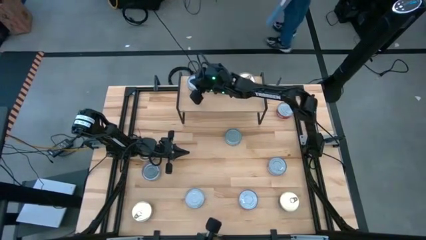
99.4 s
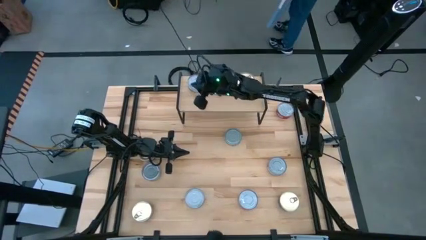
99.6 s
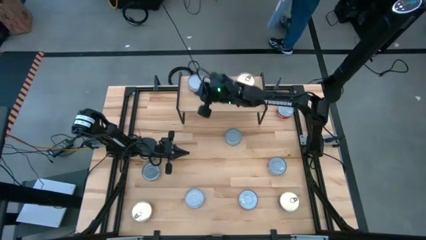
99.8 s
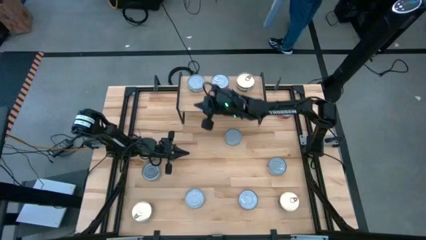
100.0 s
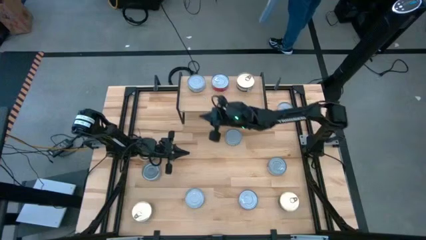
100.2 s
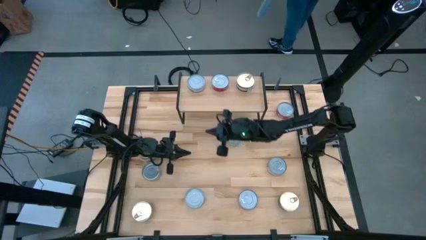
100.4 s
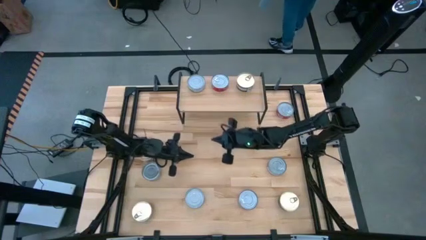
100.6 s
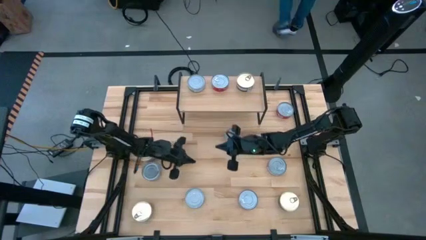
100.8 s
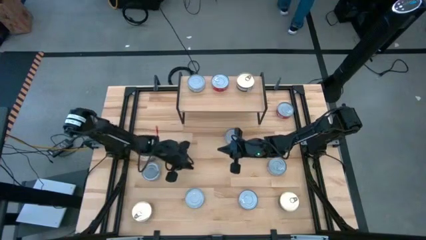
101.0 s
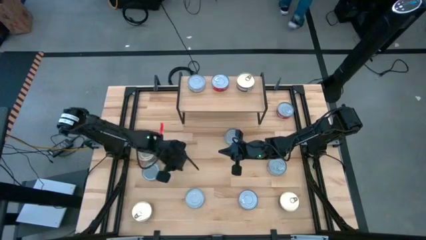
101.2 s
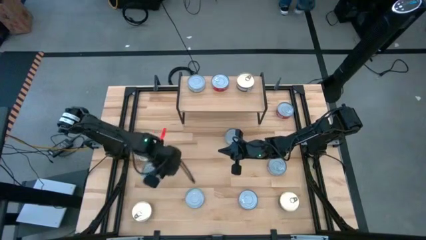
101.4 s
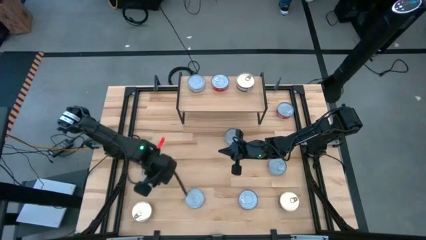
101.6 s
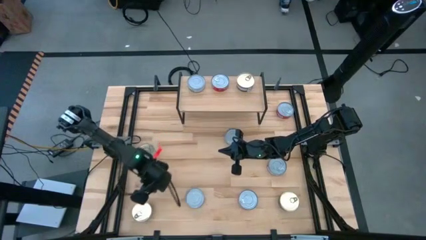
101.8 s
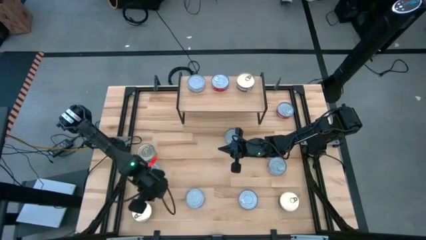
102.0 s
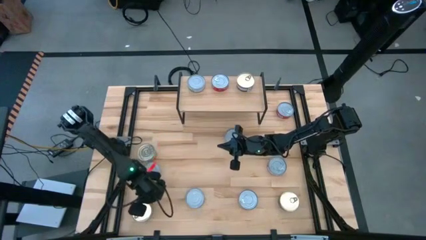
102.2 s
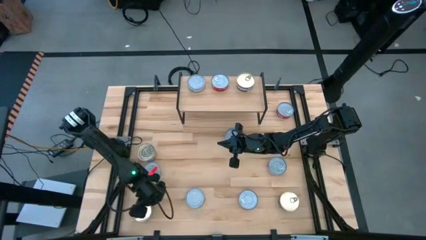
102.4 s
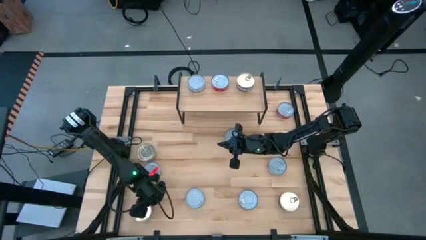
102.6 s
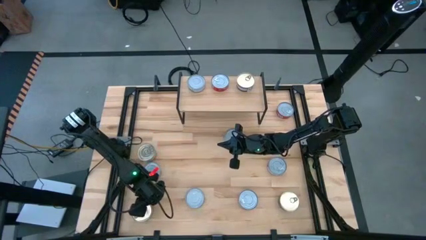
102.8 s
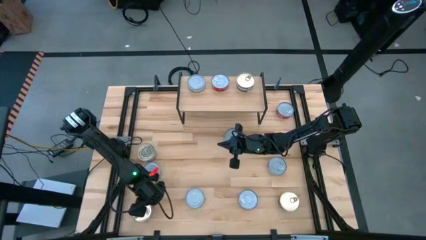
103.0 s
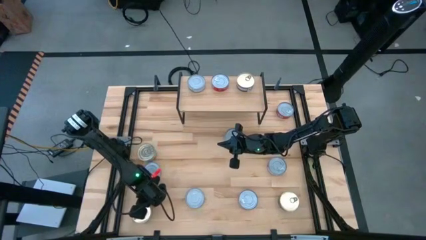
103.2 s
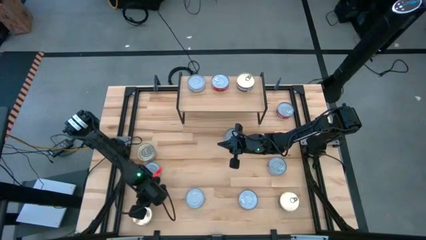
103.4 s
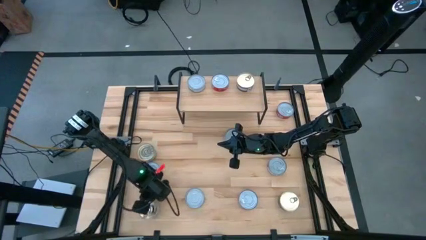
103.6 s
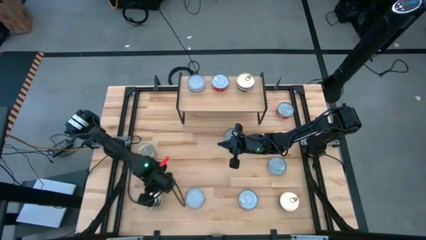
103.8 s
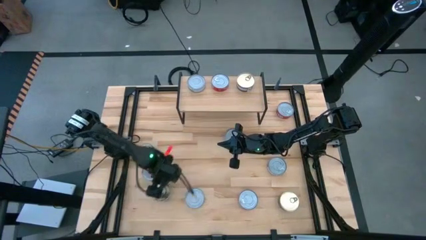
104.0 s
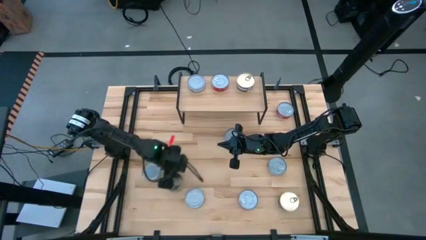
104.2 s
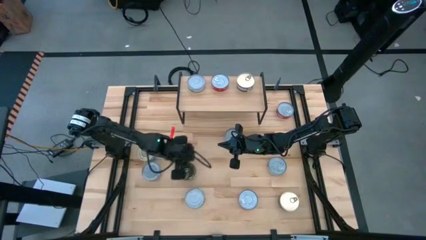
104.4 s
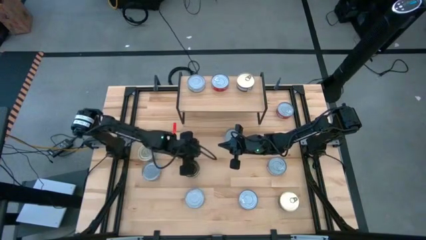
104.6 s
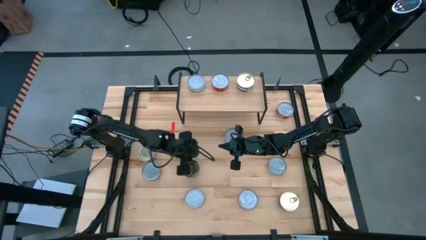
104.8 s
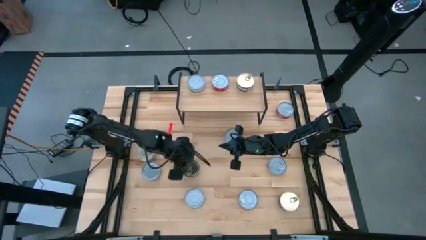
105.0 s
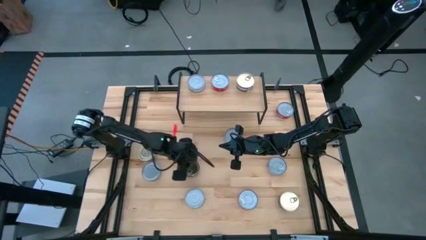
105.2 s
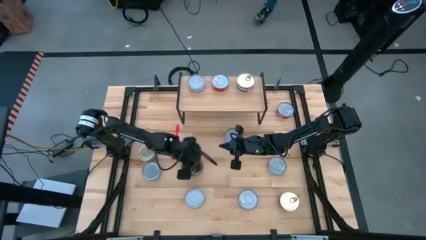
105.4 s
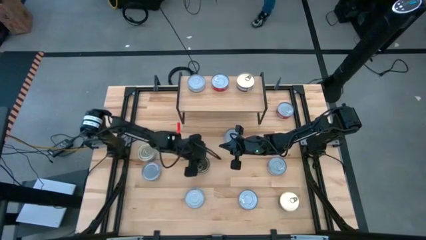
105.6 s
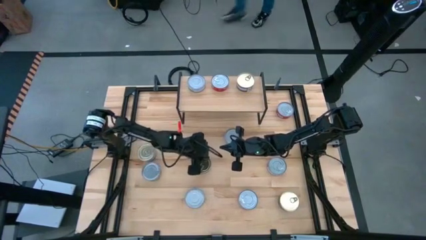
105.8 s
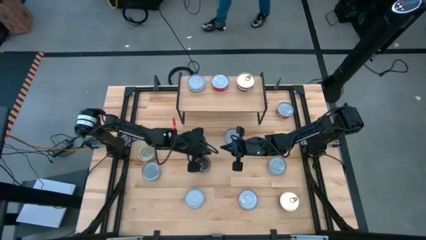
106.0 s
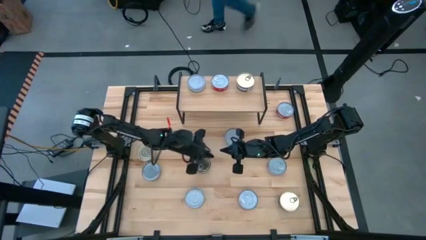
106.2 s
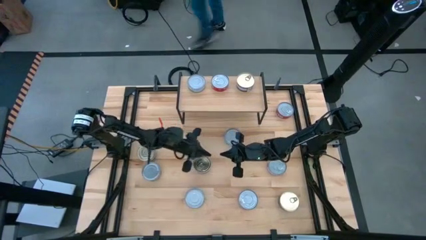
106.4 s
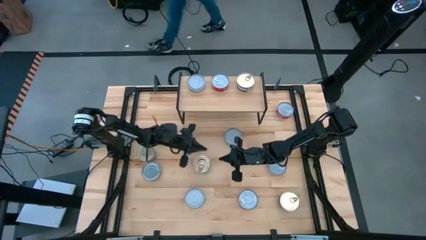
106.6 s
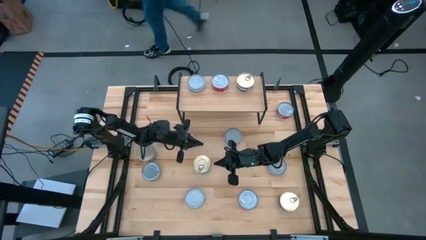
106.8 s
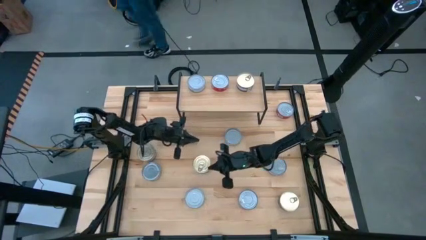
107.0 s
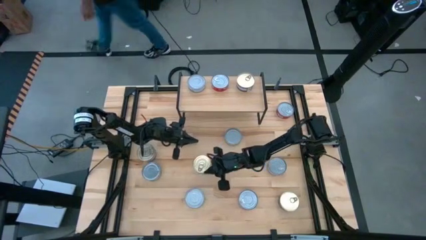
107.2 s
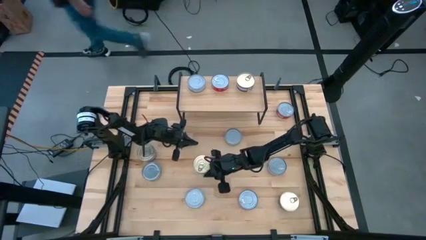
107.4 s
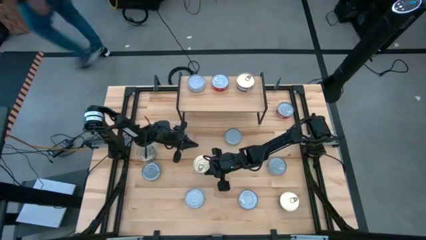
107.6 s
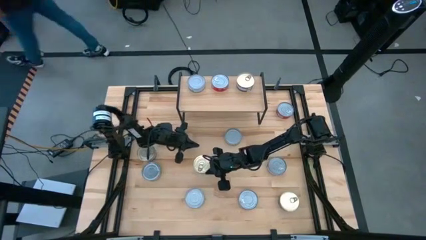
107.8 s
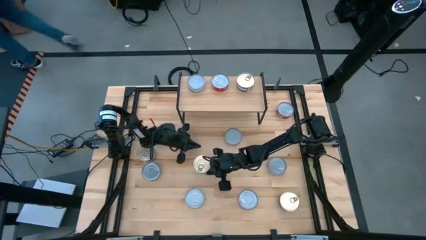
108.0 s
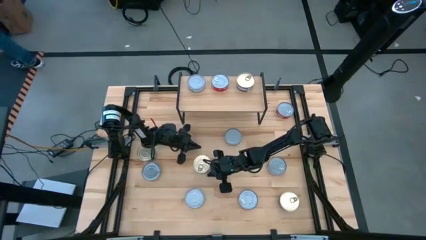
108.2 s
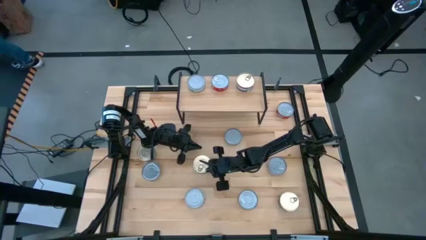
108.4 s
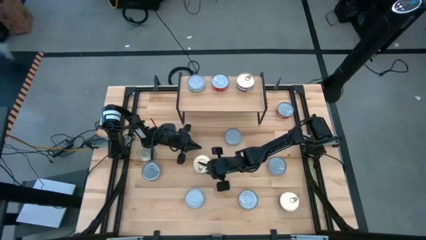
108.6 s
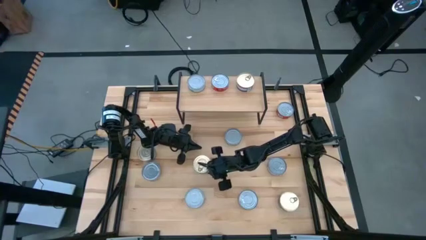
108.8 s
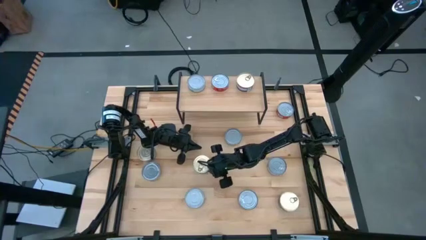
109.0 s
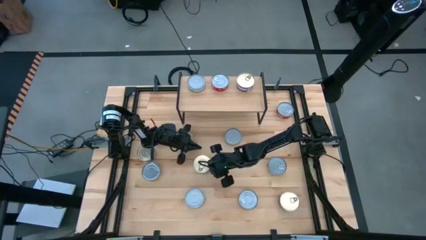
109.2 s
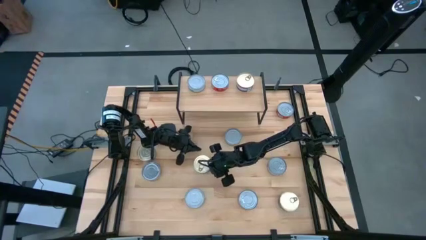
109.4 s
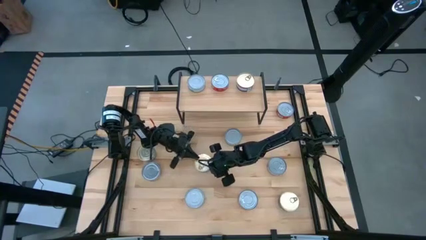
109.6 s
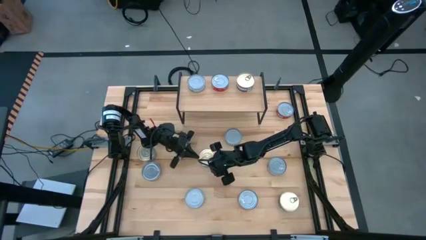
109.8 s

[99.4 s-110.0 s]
Task: Stack canned seafood by type on shelf
Stack the blue and pink tuna can on top of the blue and pink tuna can on the shelf

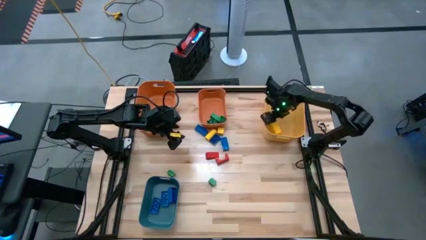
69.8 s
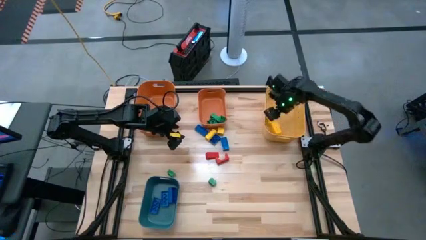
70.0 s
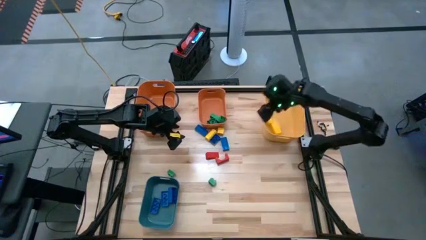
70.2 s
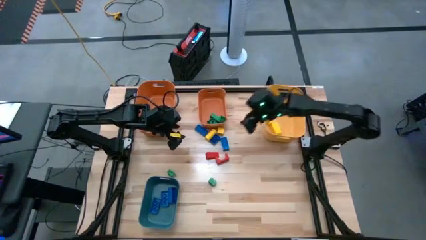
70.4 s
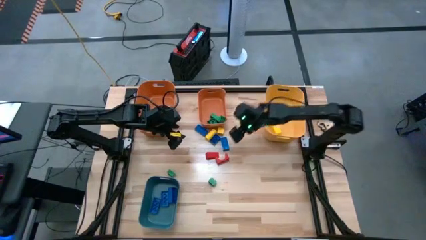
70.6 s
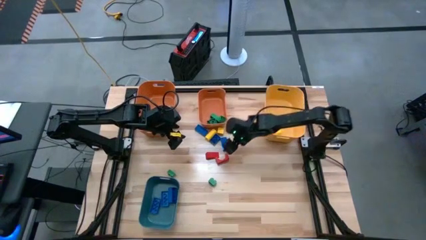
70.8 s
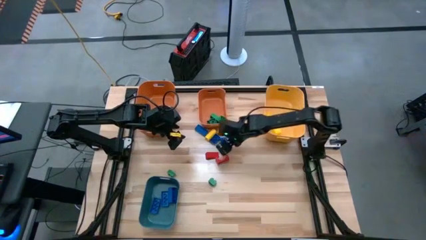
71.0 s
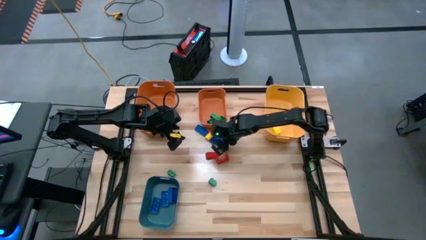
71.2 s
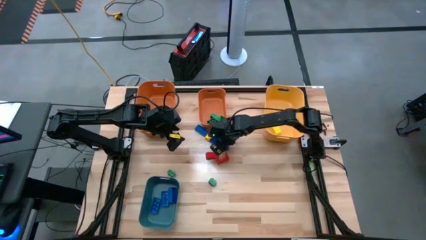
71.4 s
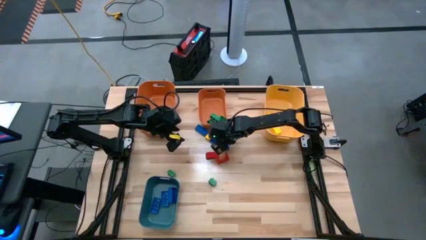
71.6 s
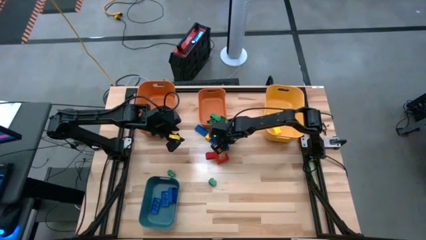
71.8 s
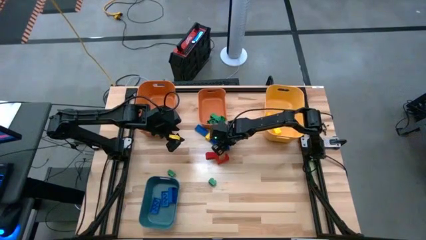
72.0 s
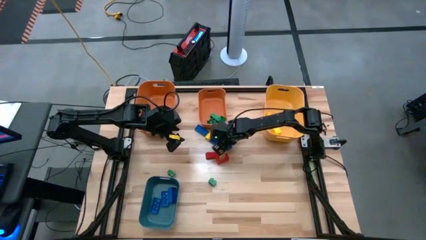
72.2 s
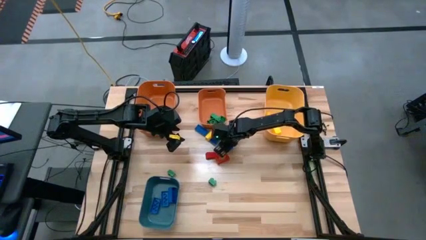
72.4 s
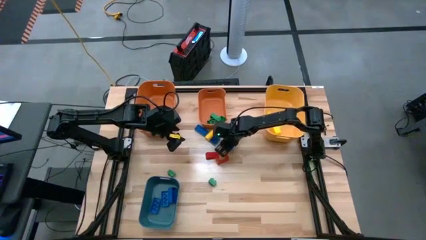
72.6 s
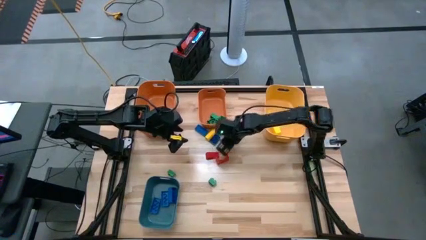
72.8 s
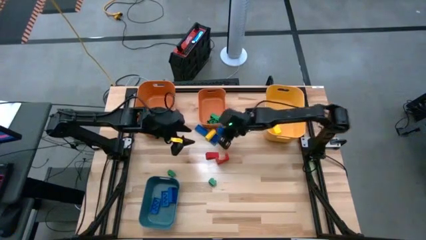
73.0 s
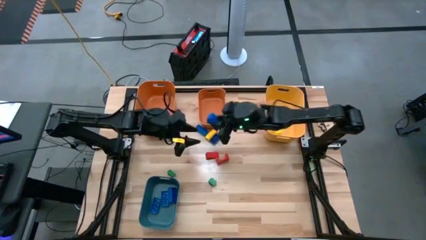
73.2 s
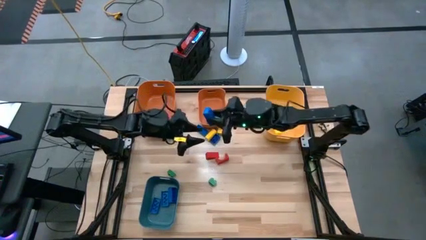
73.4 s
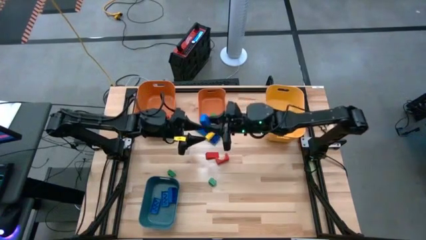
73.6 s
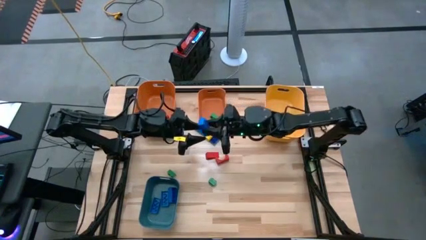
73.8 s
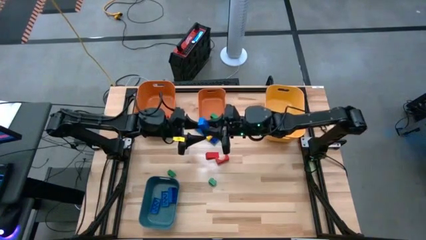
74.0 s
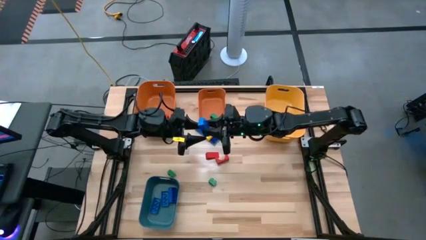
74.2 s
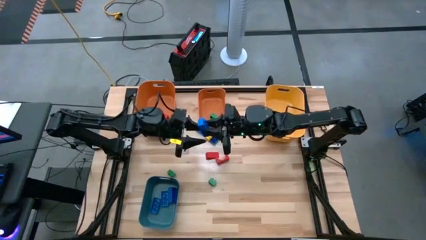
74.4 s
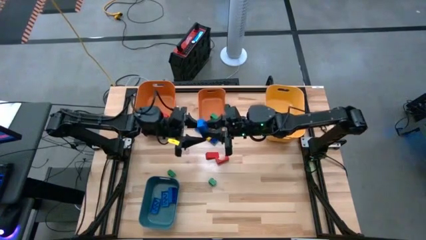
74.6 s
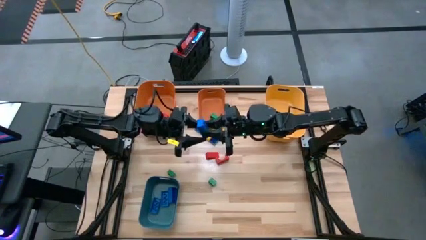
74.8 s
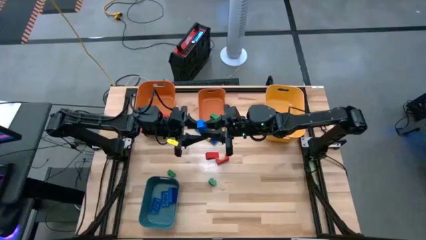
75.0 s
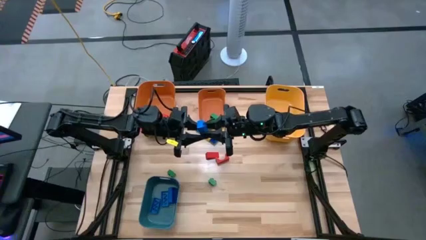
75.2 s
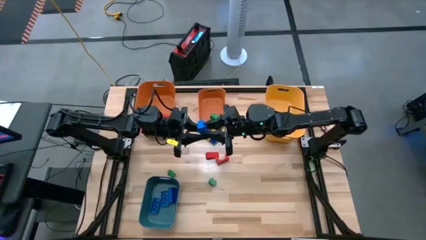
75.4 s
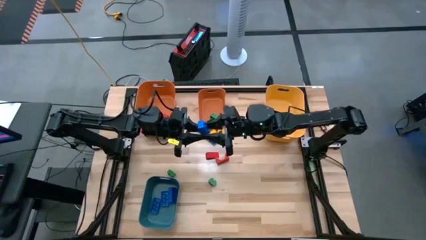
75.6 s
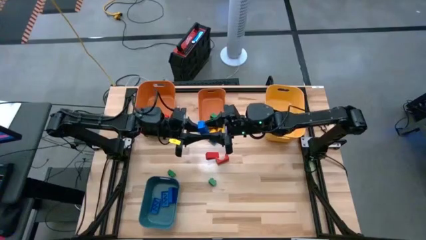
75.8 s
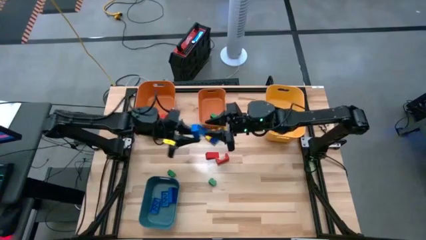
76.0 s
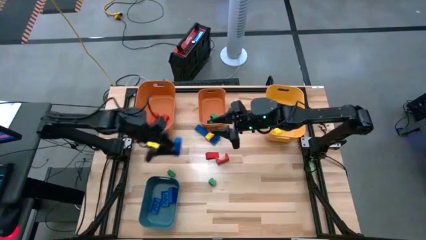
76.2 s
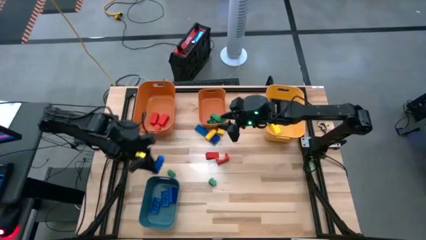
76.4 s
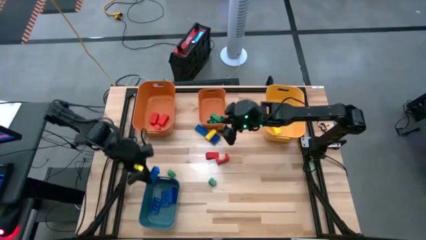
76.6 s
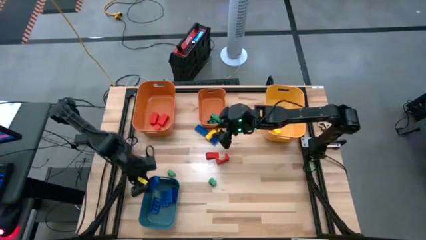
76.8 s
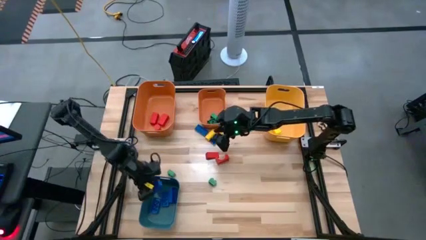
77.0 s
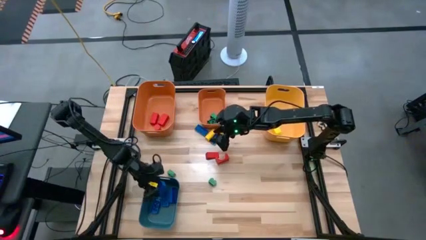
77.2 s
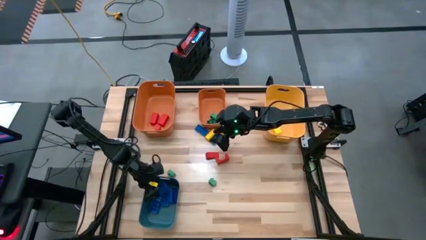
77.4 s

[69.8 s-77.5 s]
Task: Sort blocks
Put the blue game piece into the blue bin
